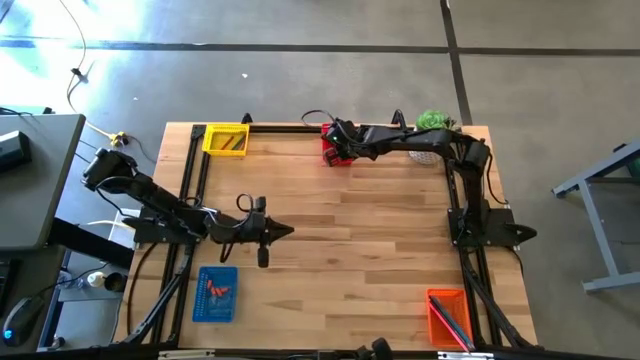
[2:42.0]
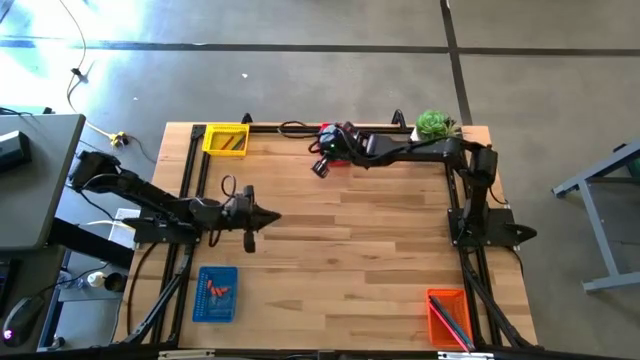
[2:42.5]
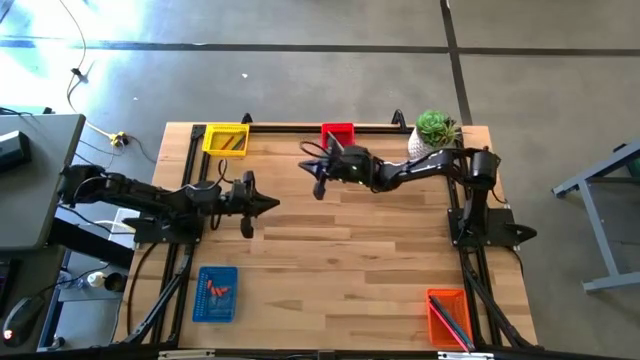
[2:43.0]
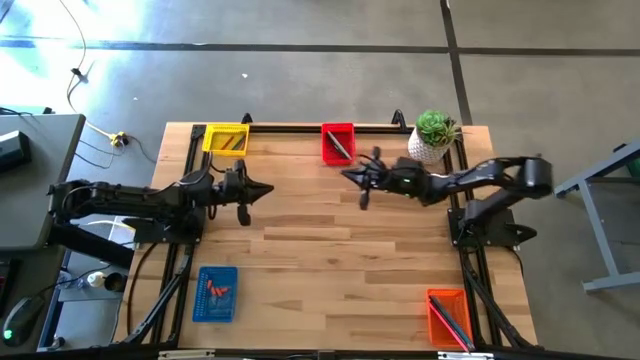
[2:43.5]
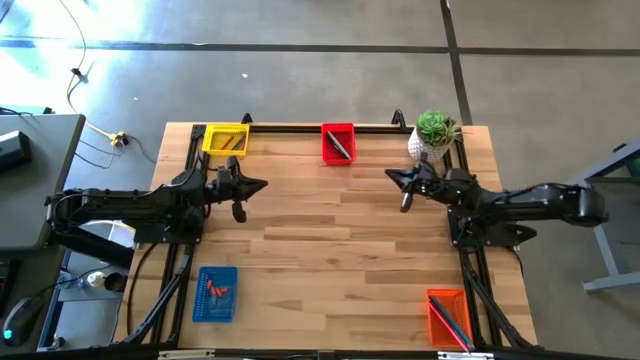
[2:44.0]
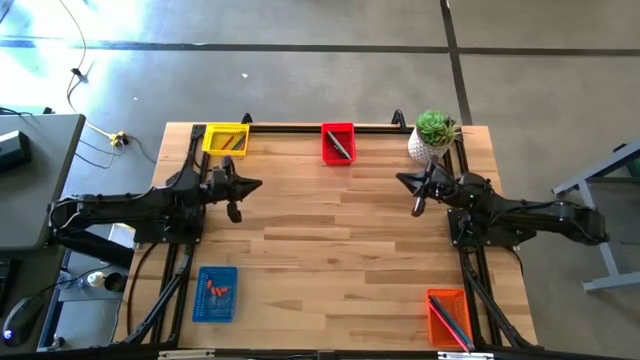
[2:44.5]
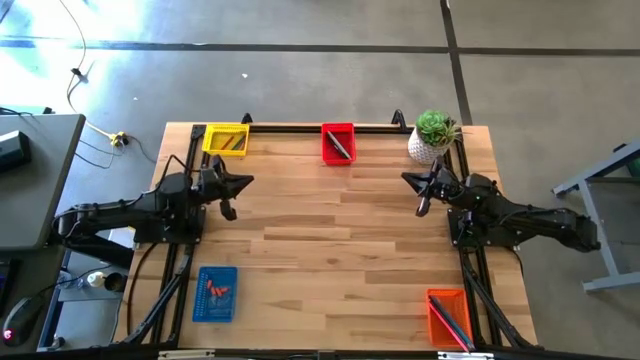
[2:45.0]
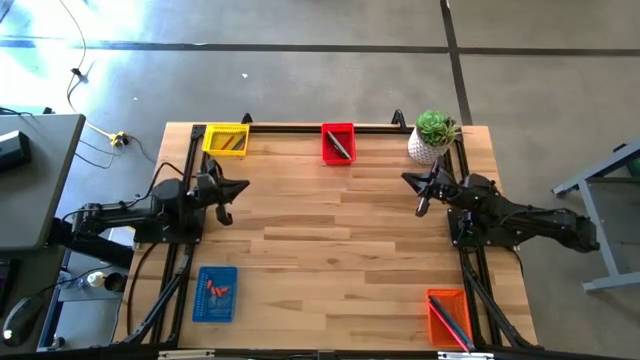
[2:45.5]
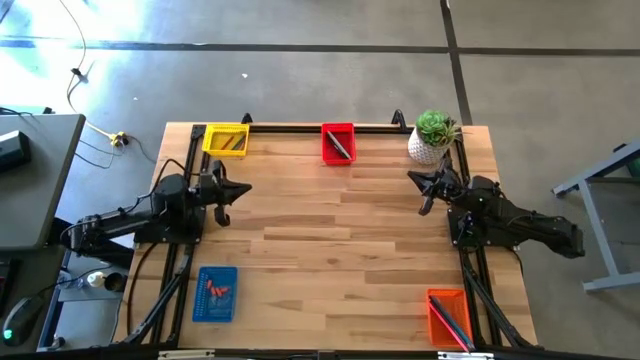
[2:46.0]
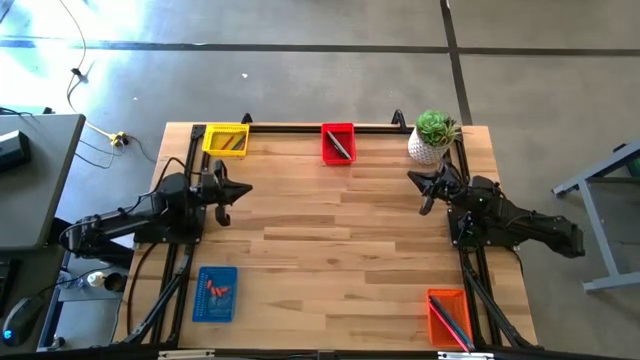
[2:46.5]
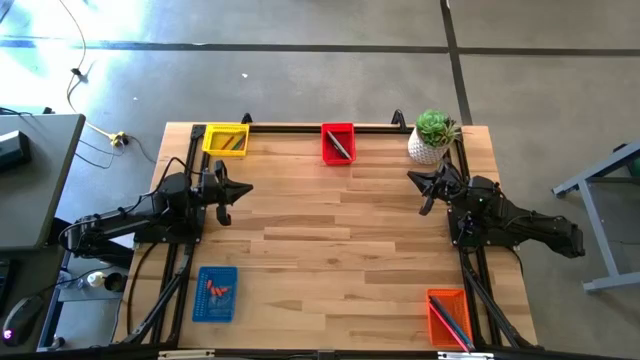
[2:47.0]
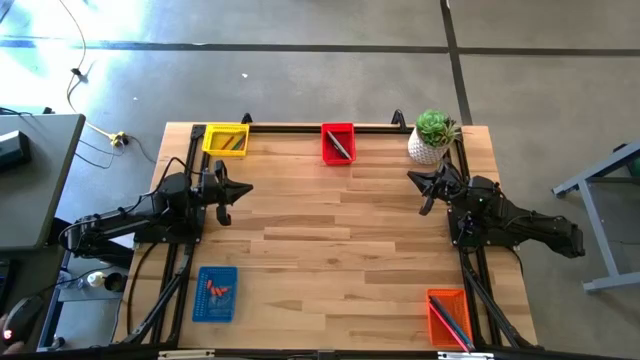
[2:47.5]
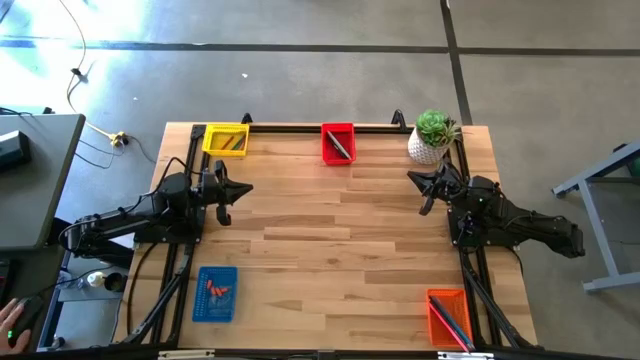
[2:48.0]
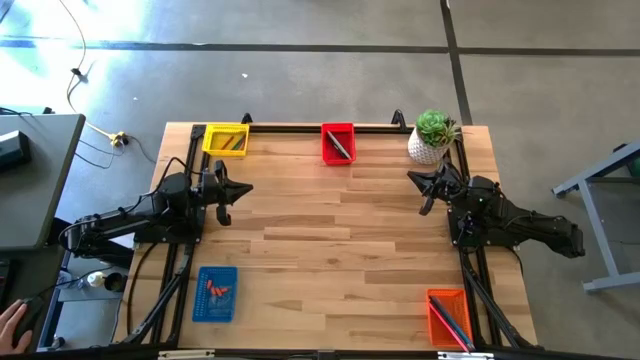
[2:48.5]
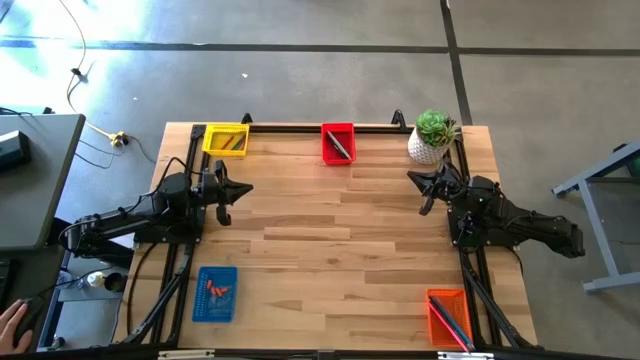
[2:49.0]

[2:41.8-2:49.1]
Task: Sort crayons/erasers/pens/pencils in bins
Return to Home Position

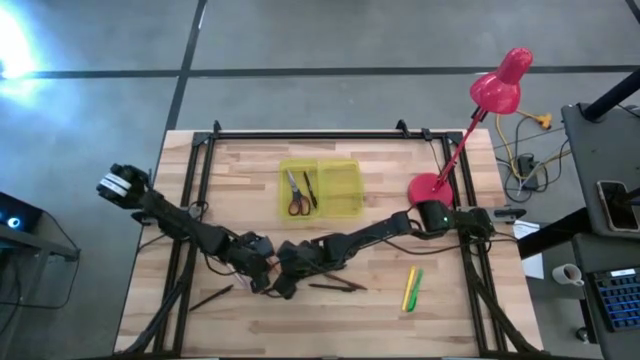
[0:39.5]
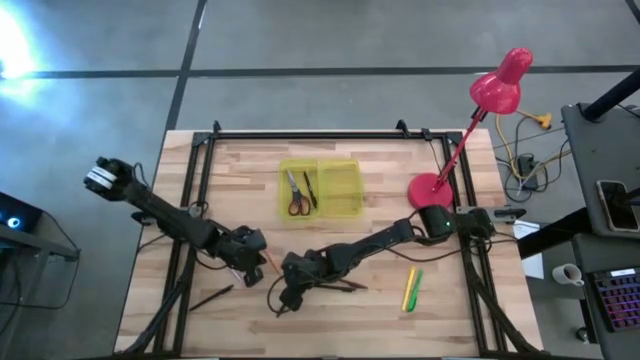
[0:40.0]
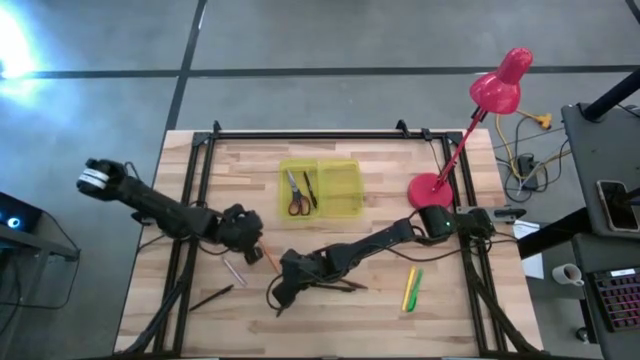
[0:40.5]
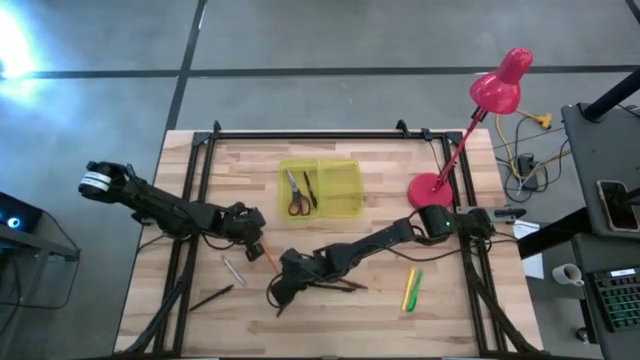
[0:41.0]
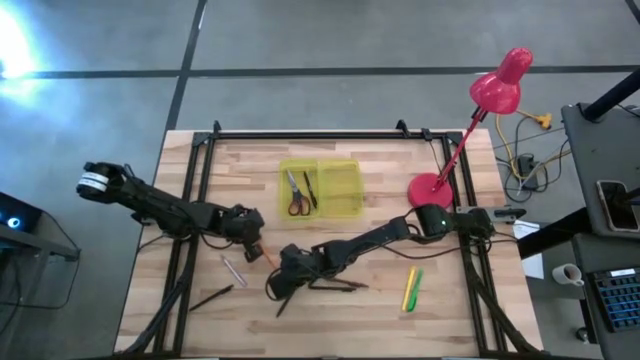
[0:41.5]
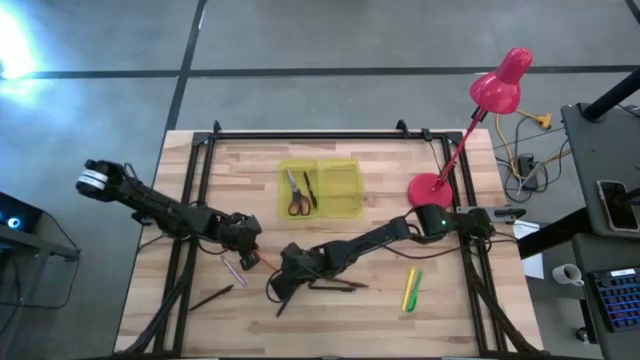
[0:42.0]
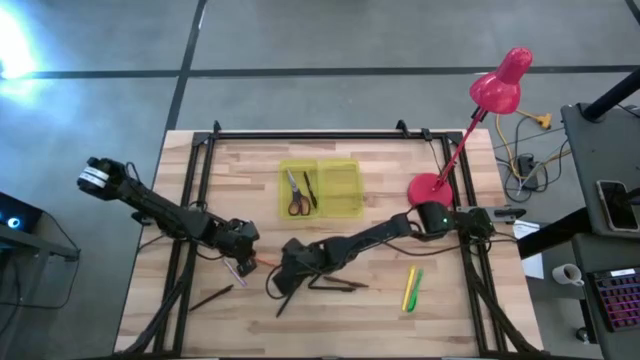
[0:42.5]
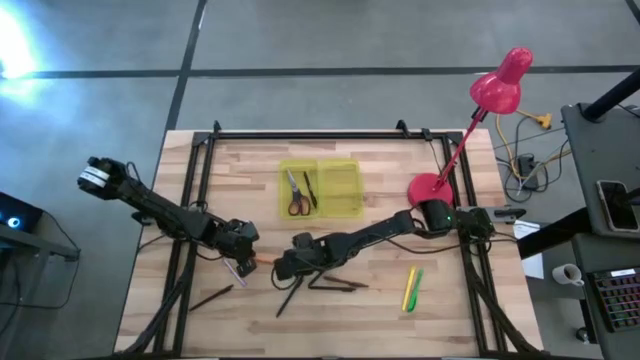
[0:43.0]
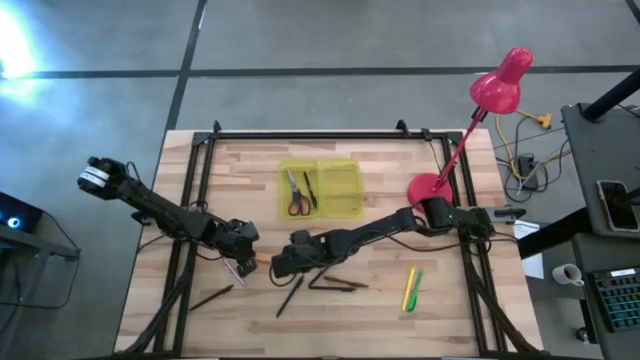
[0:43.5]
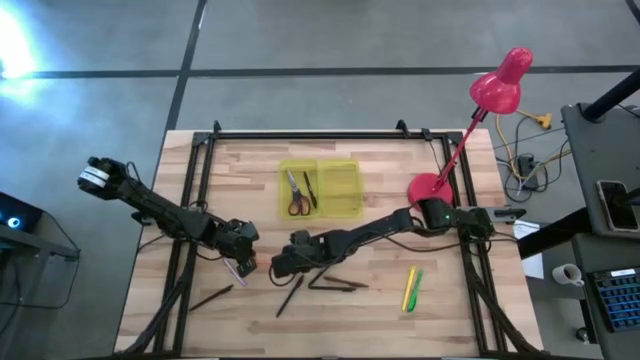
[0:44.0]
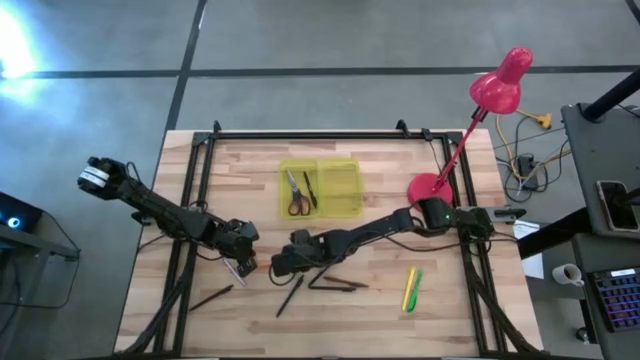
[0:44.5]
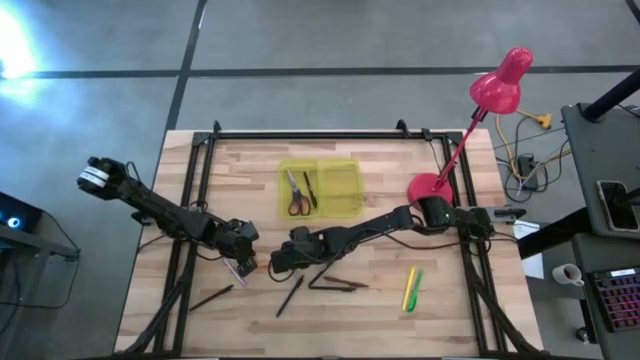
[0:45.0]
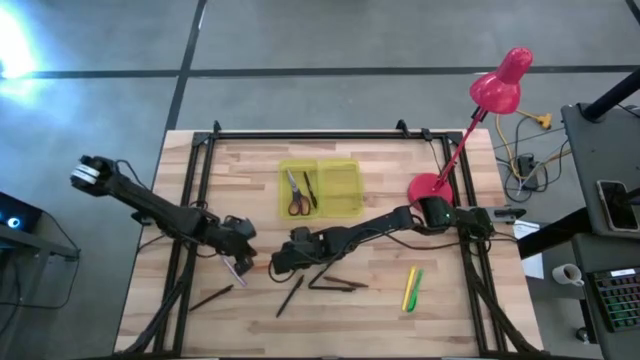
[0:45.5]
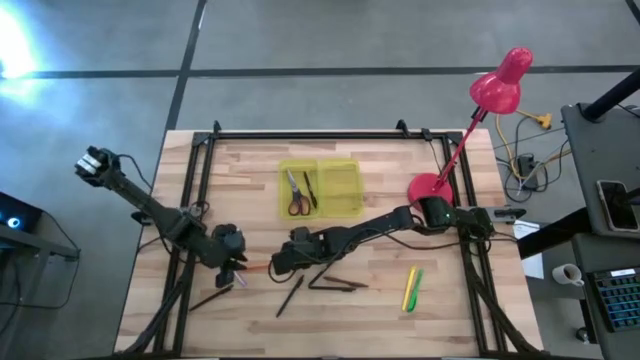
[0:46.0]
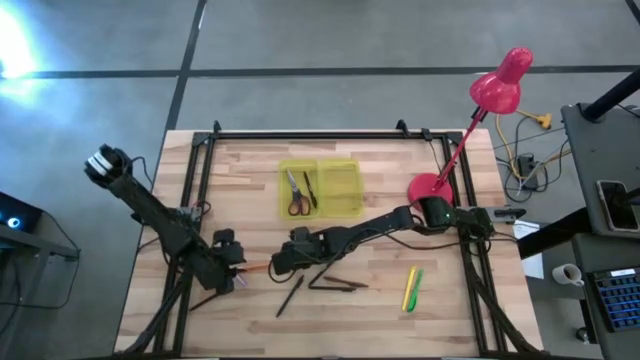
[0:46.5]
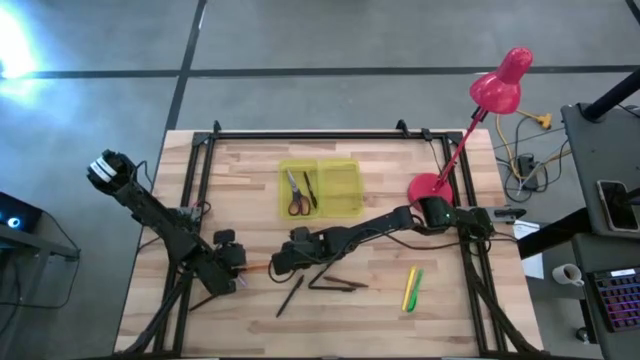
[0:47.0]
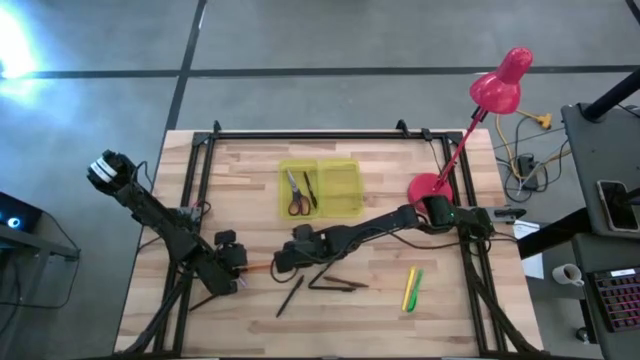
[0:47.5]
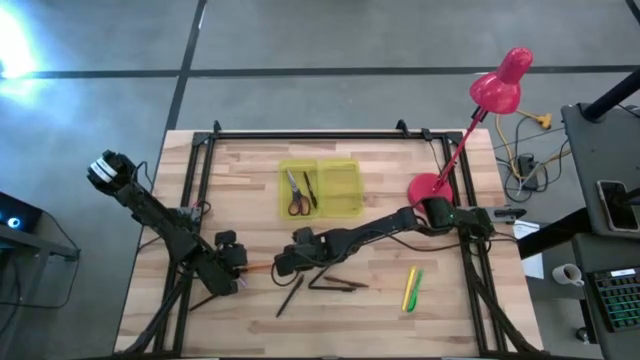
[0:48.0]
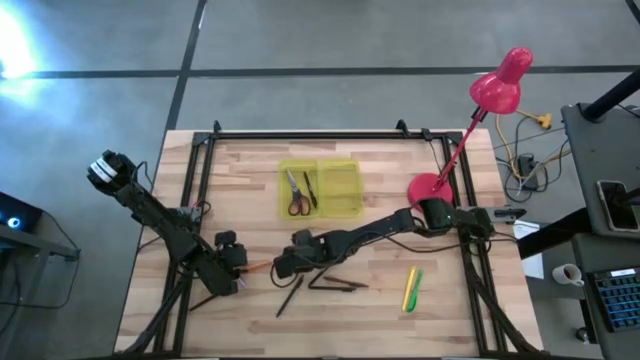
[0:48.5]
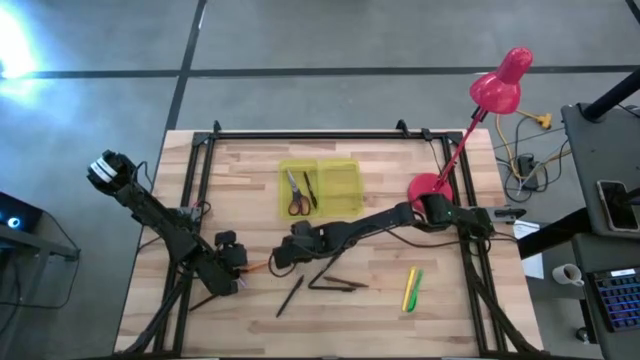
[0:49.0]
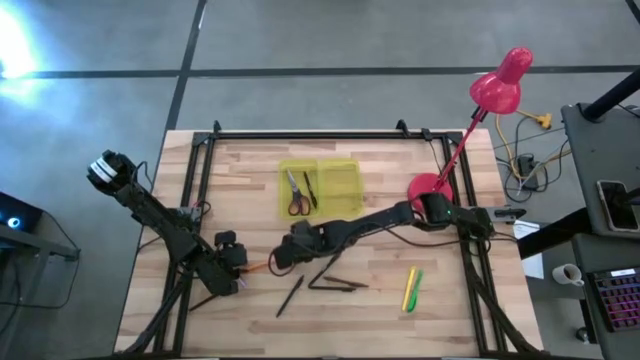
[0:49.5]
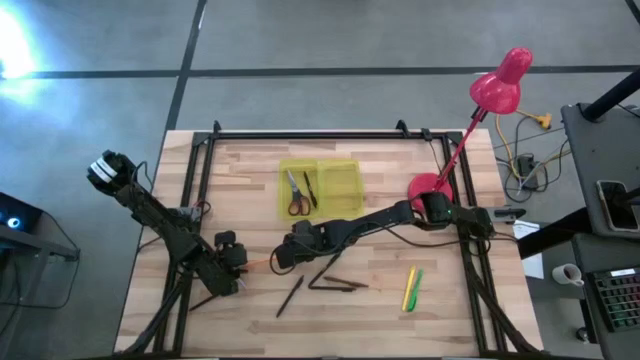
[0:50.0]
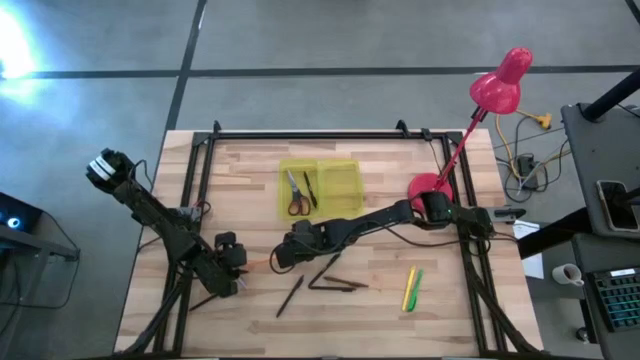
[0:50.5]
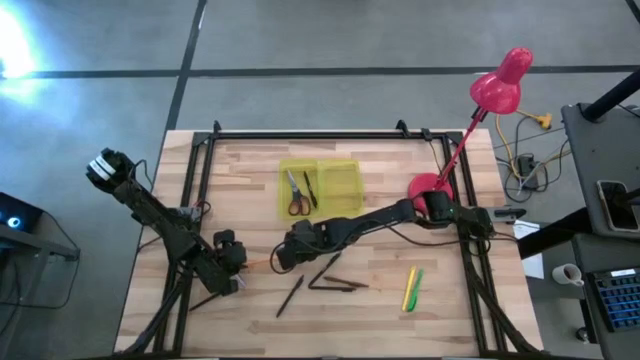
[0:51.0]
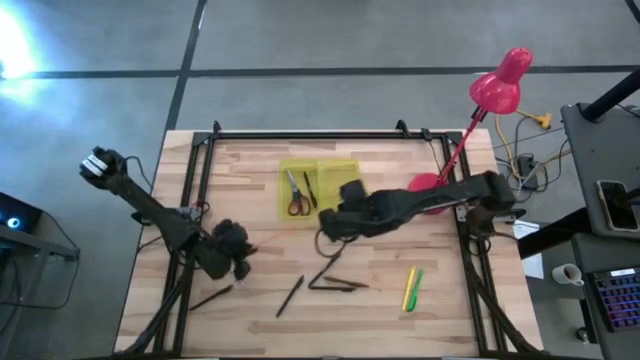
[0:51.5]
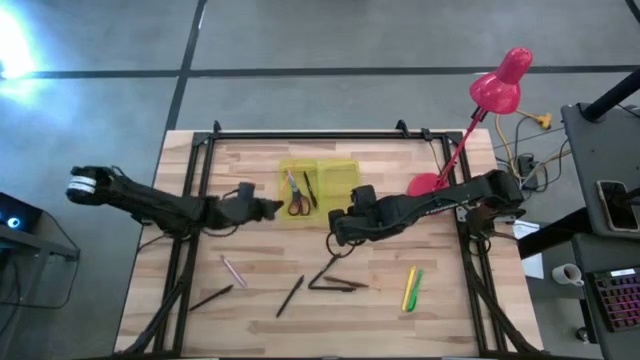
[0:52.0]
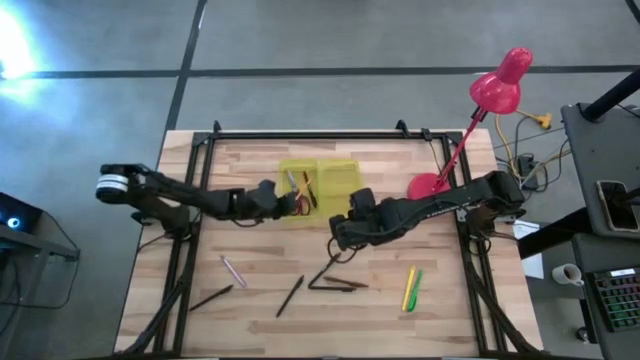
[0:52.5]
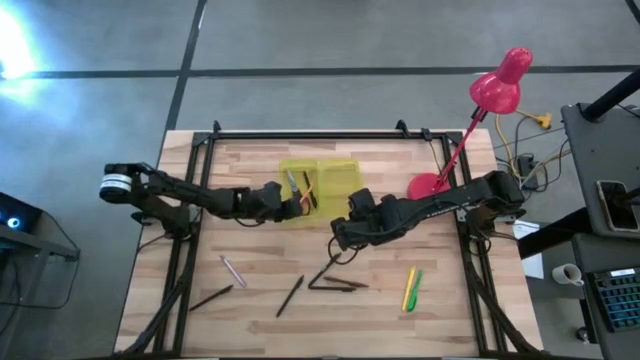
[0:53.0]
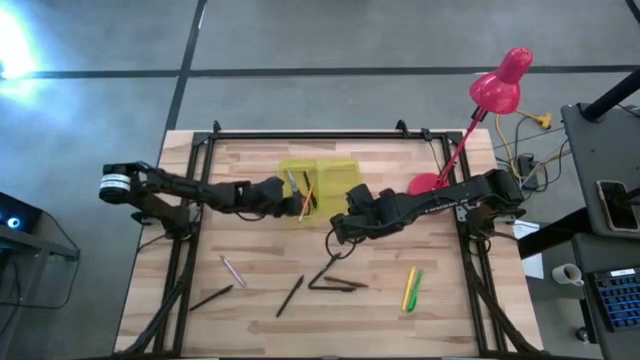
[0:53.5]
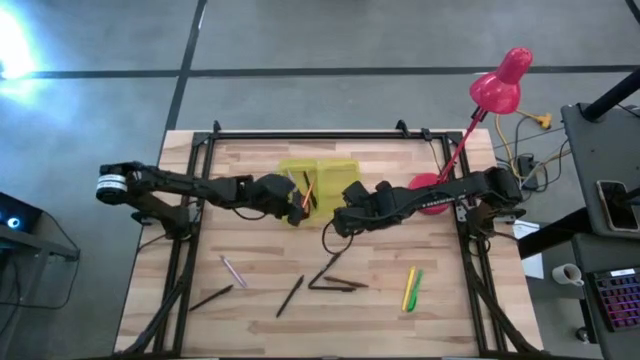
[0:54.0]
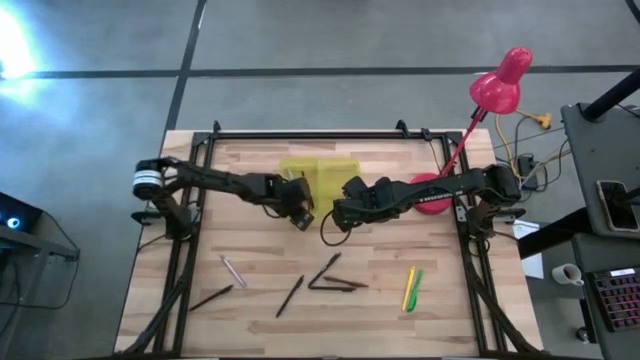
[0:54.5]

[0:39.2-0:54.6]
Task: Pick & place school supplies into a supply box
Put the orange pencil into the supply box
